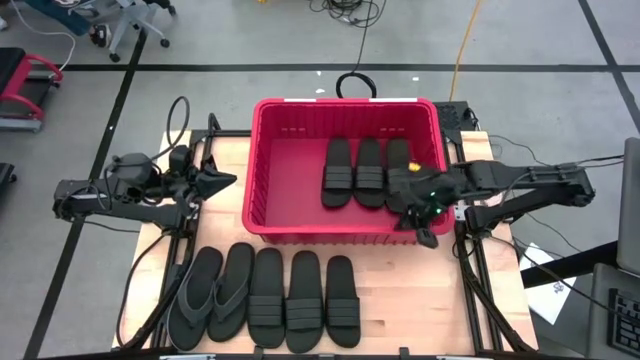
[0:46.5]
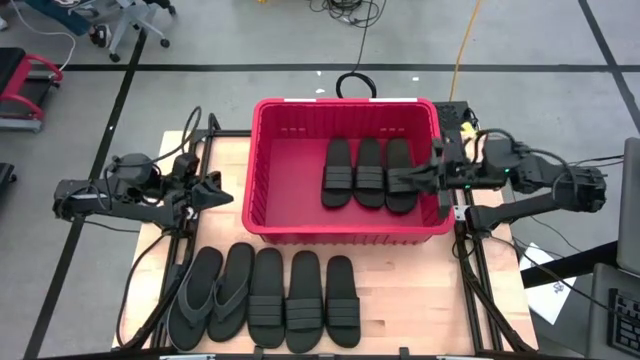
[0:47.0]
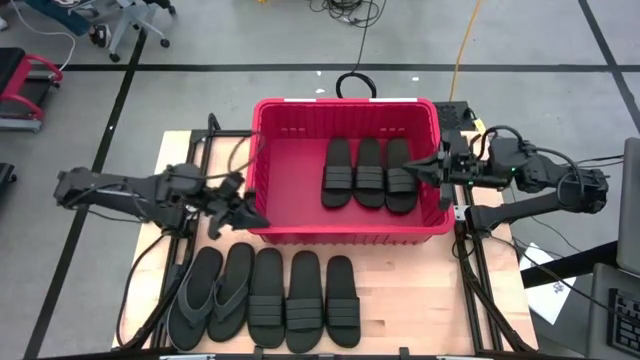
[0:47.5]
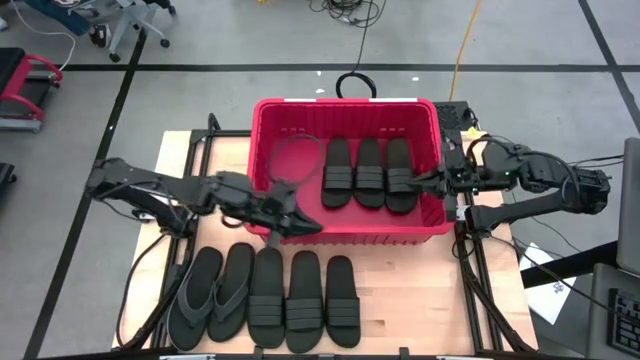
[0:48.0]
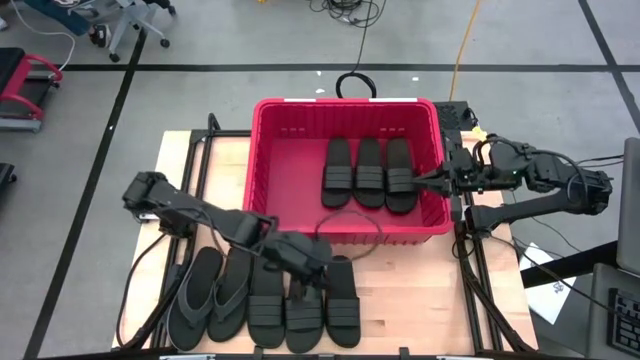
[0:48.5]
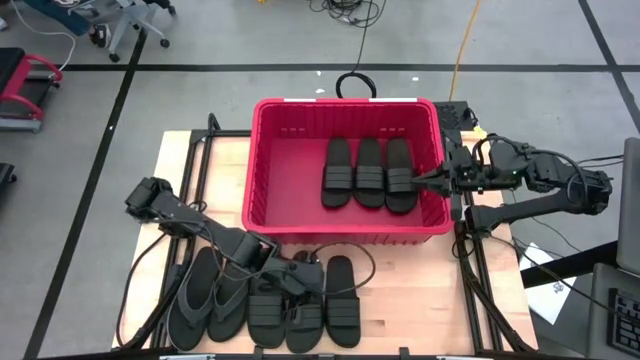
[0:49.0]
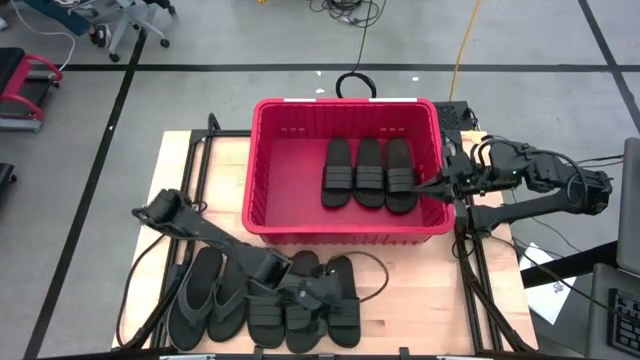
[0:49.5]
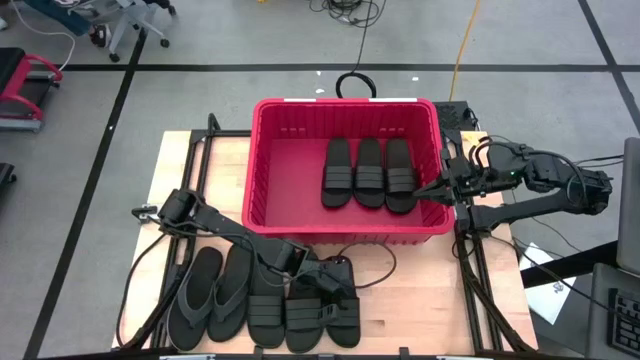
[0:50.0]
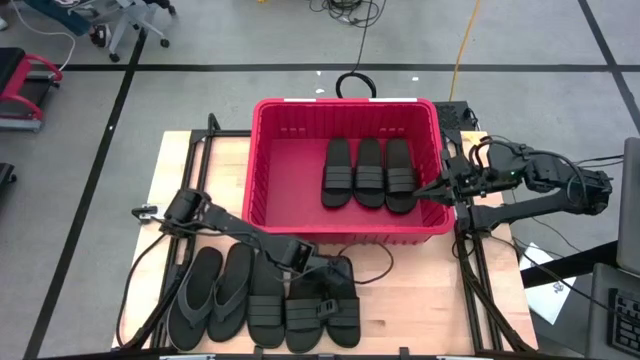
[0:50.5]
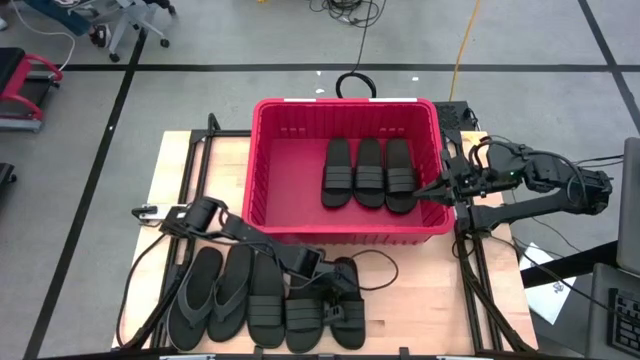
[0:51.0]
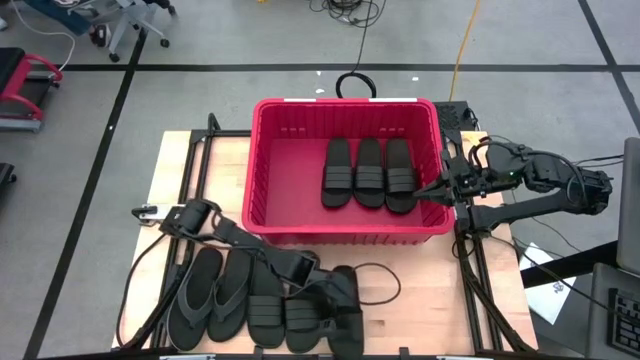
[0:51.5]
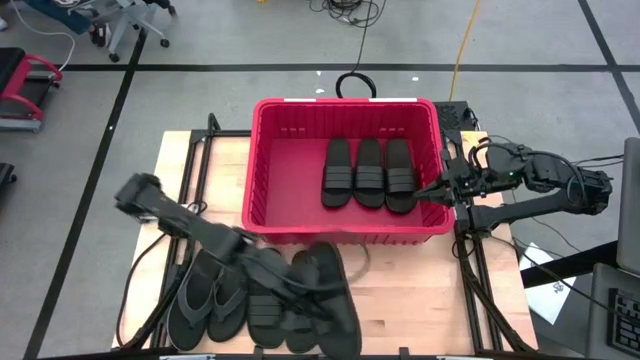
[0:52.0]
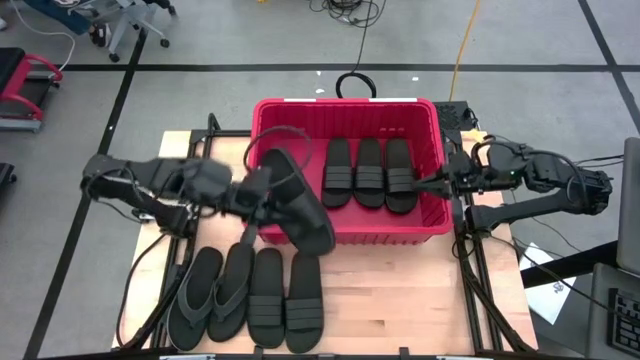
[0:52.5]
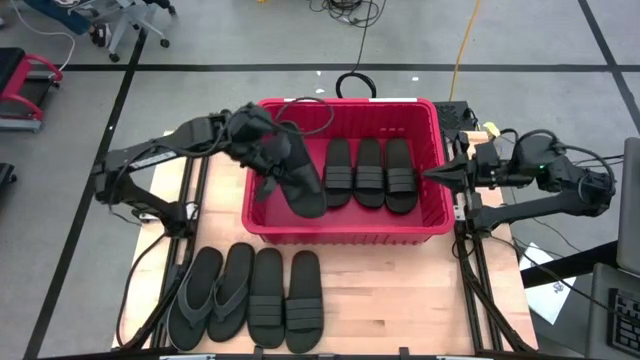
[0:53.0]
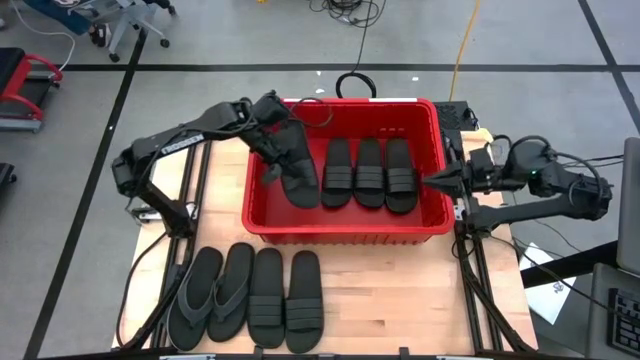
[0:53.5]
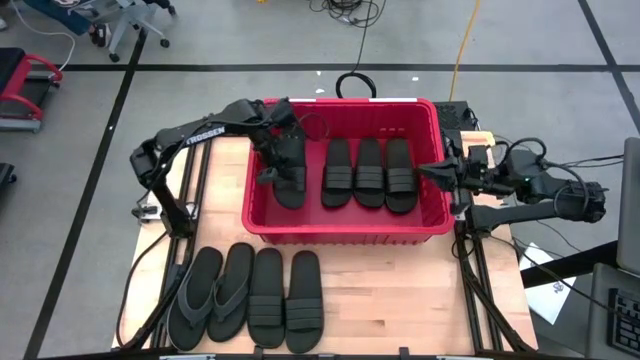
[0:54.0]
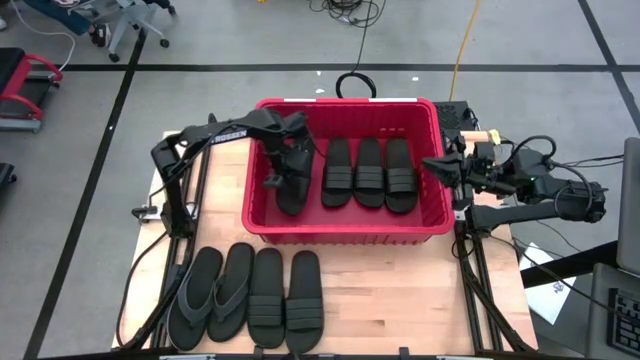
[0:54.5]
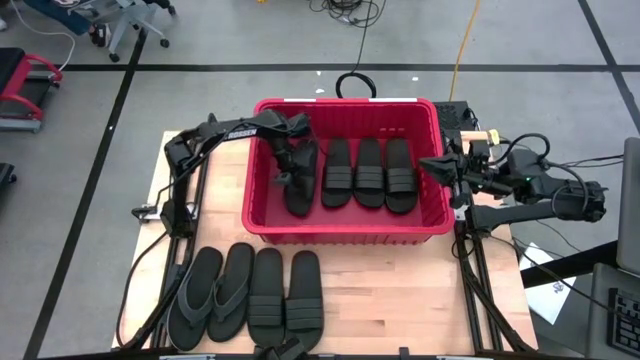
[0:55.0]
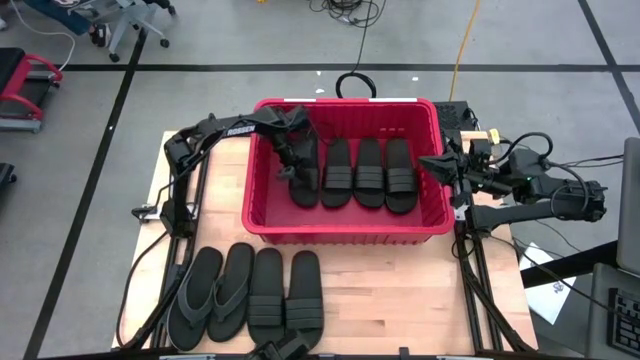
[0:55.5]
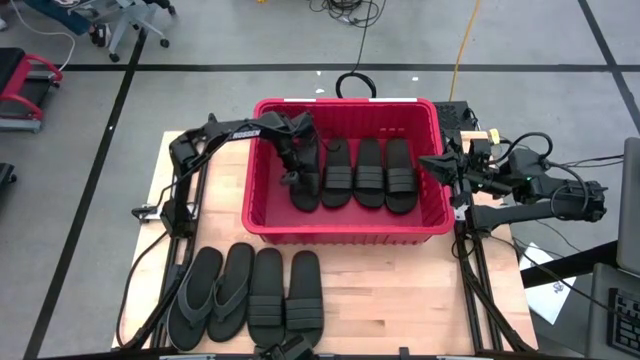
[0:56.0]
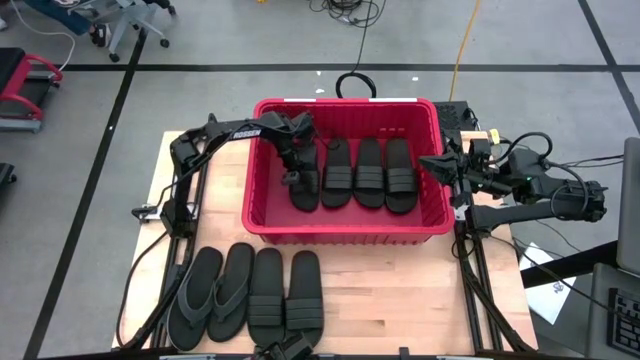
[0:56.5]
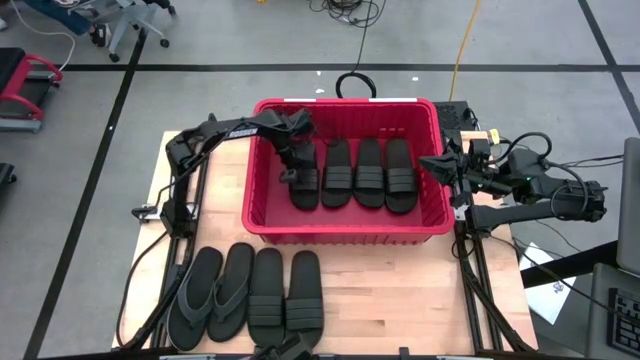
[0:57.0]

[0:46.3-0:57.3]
Task: Pick and place slides into bin
Put the black slide into the red container

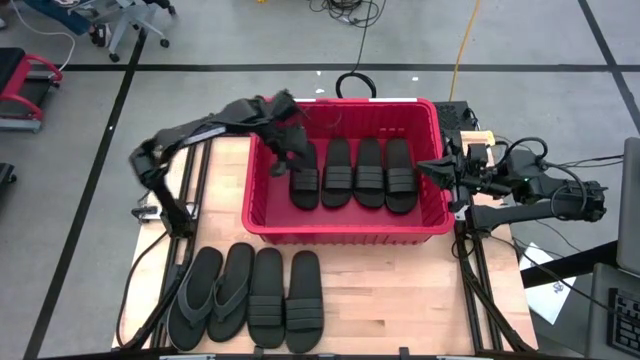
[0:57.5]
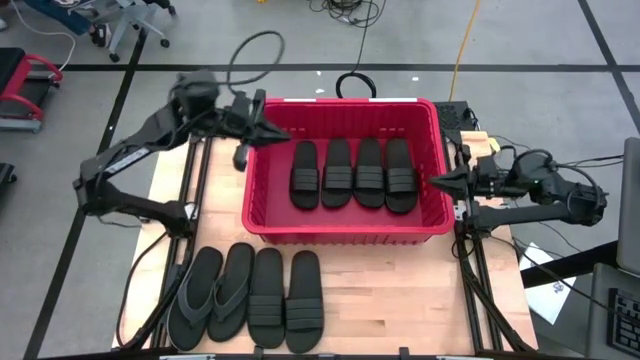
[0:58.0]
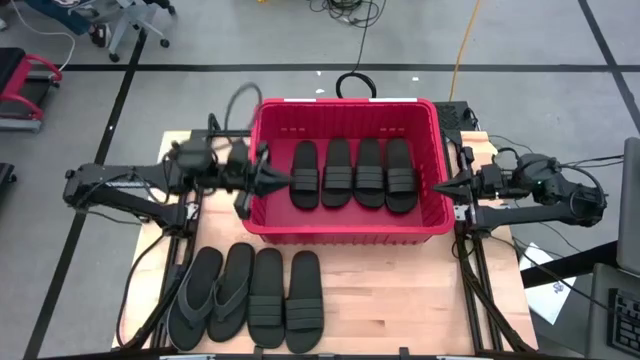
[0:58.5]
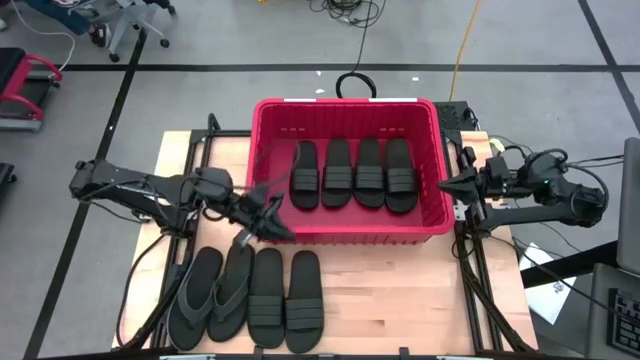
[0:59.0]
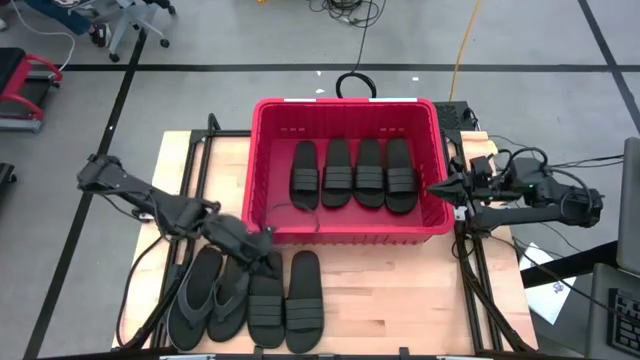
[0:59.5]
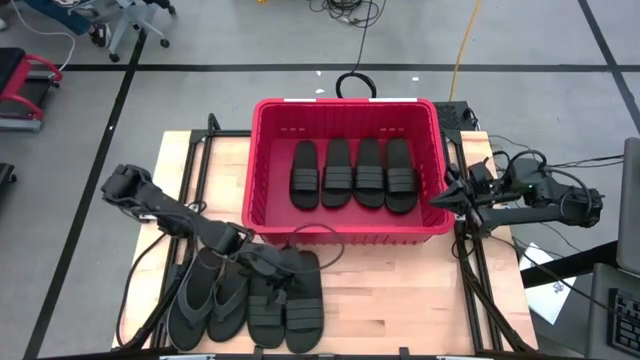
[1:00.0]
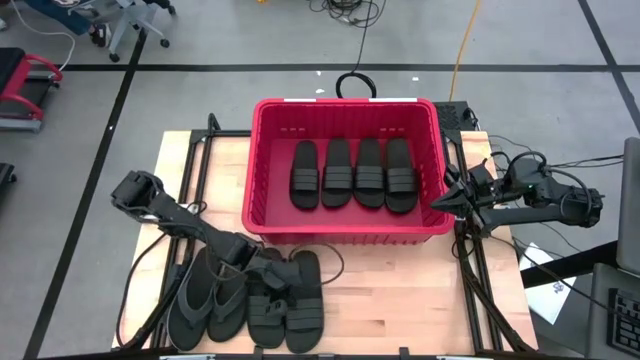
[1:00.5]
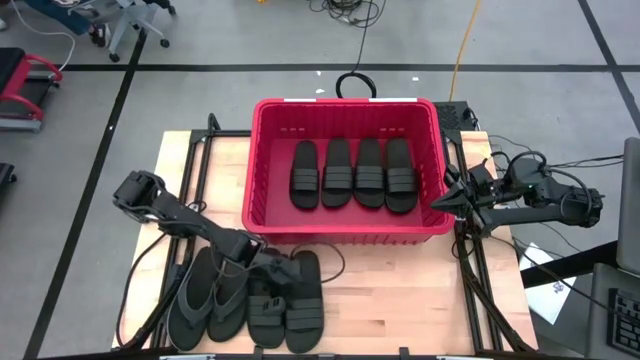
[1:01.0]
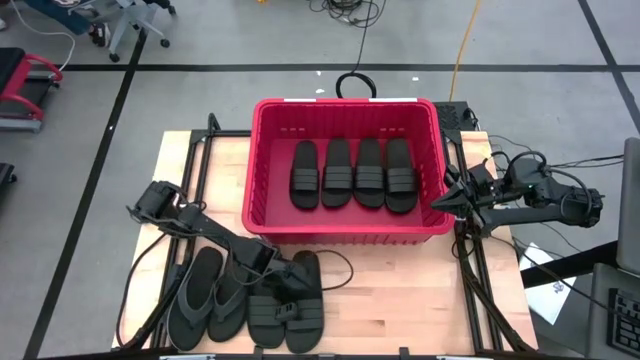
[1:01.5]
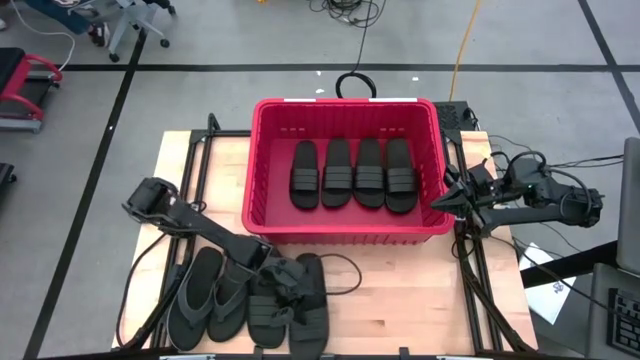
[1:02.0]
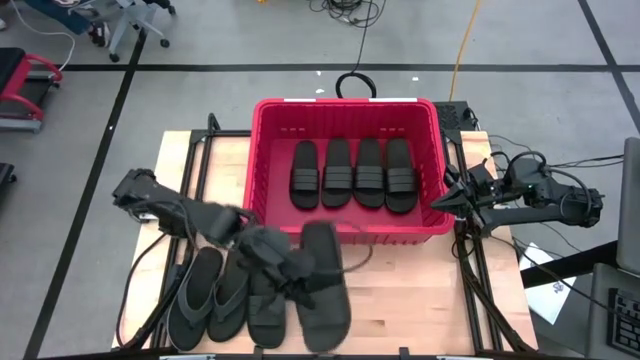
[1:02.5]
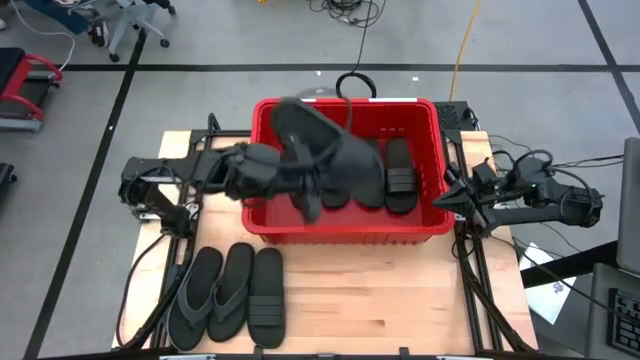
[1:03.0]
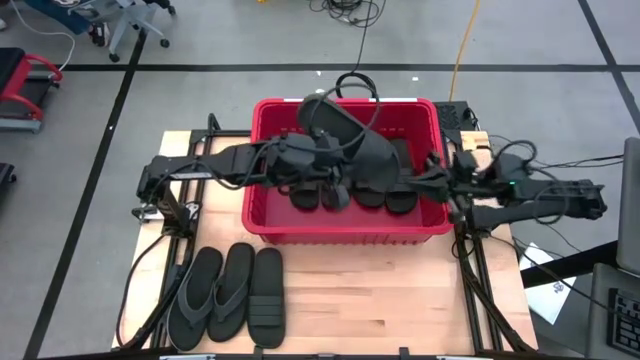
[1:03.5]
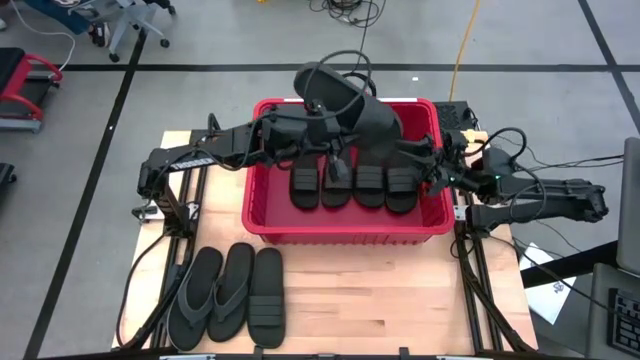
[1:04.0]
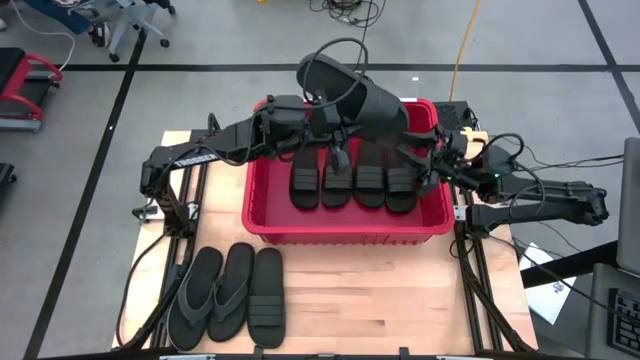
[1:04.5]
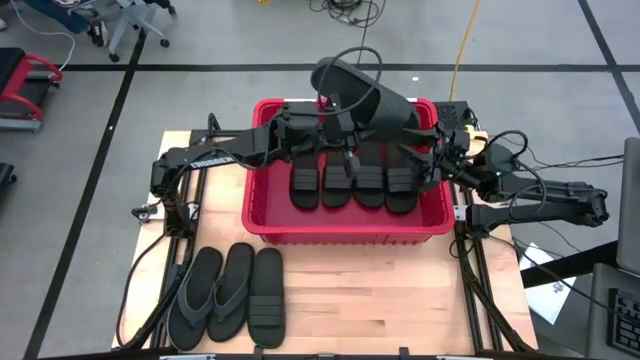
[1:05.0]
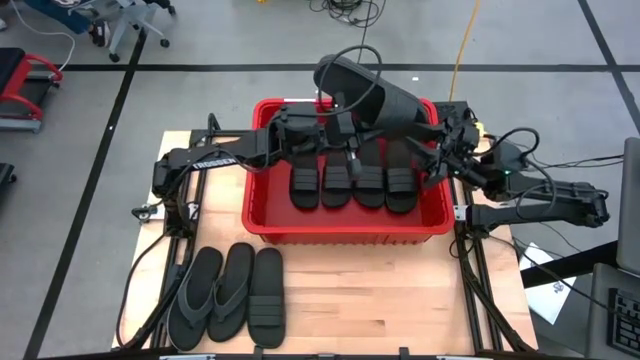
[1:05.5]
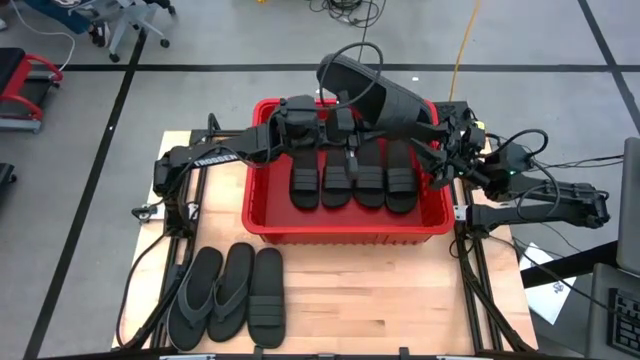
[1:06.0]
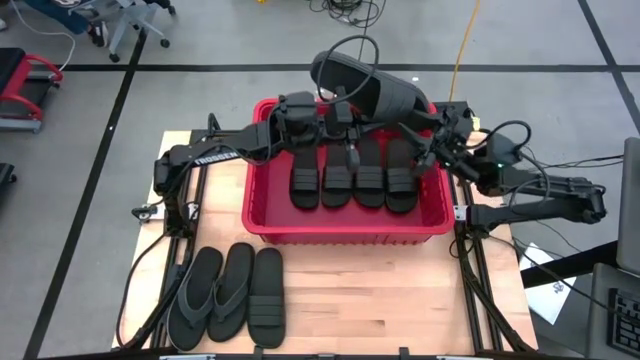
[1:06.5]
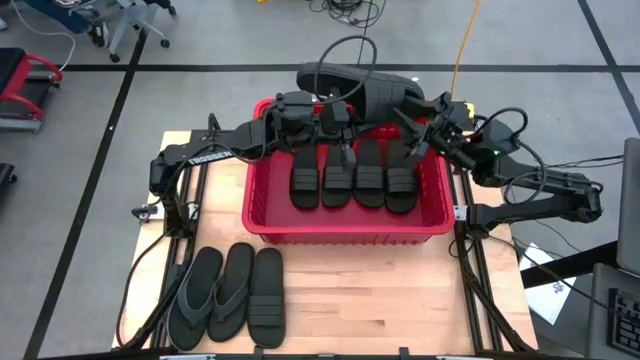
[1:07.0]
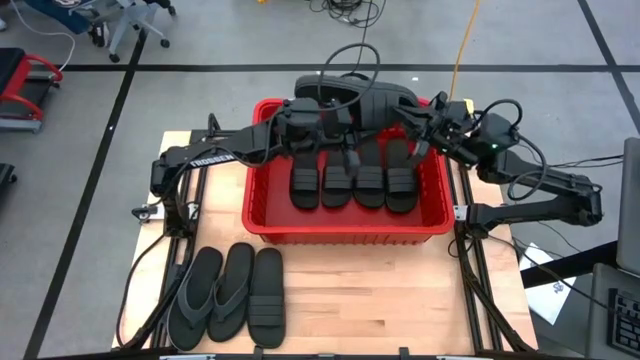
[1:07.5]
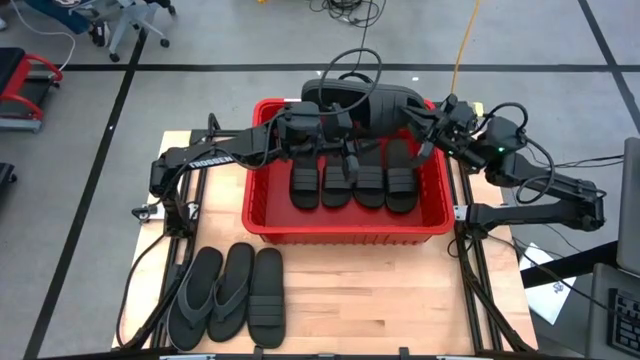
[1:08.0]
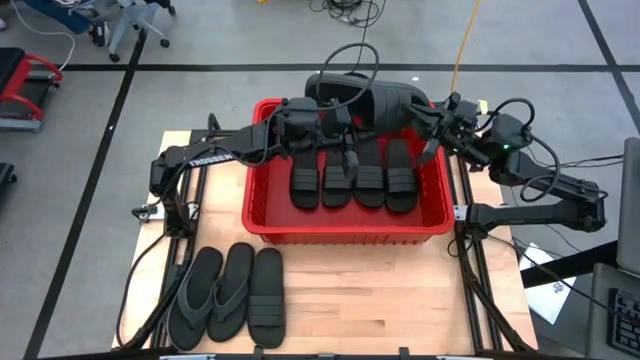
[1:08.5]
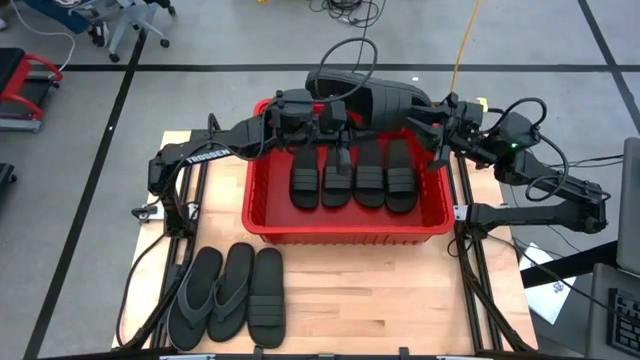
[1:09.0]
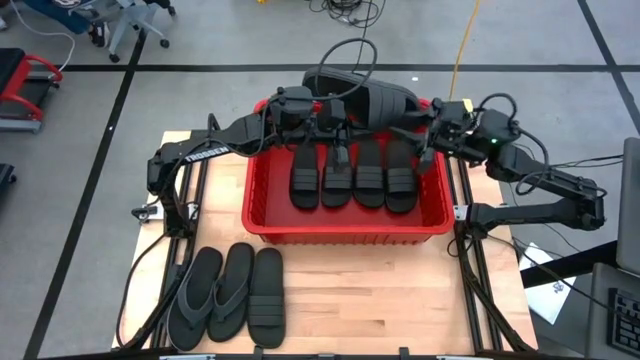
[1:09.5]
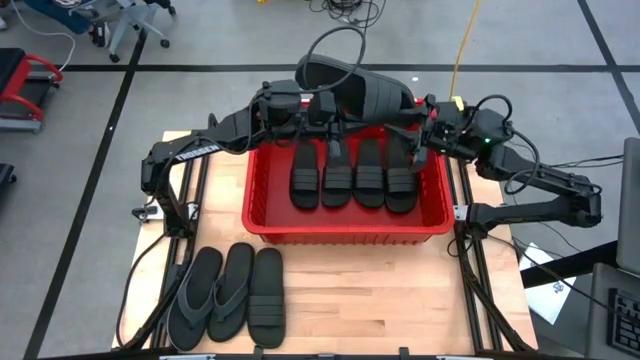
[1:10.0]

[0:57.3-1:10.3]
Put the black slide into the red container
